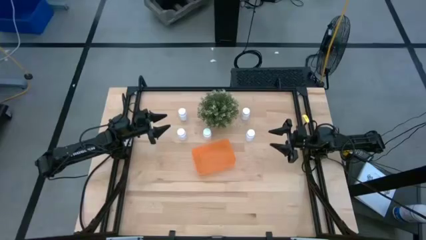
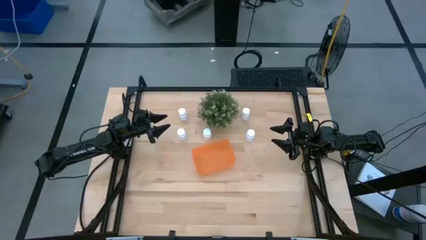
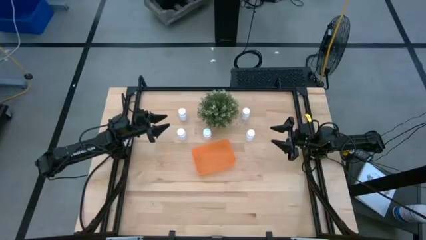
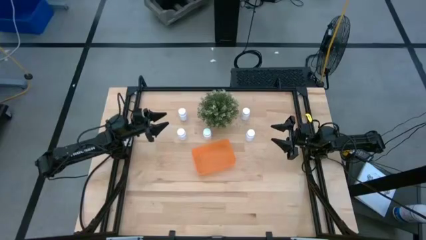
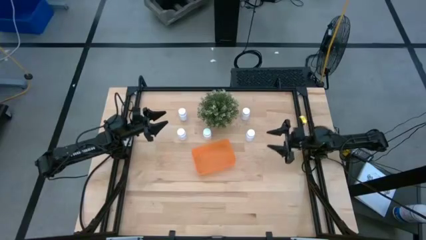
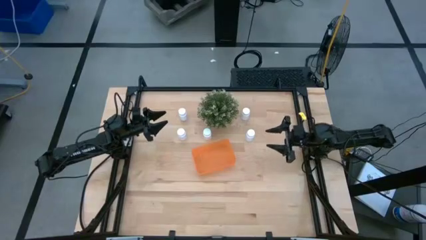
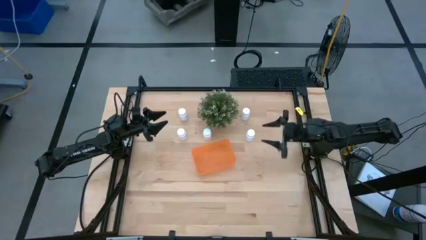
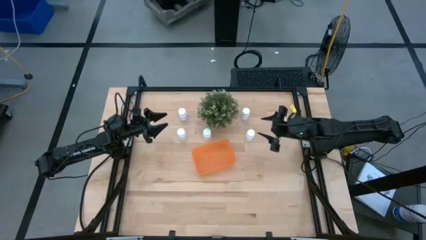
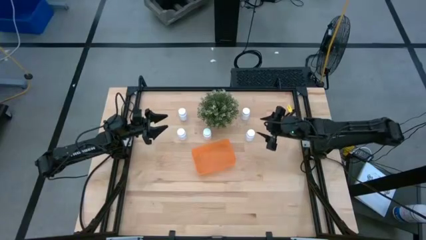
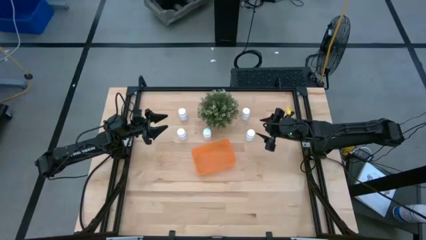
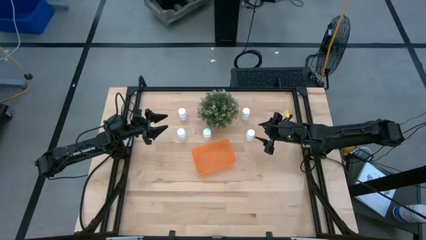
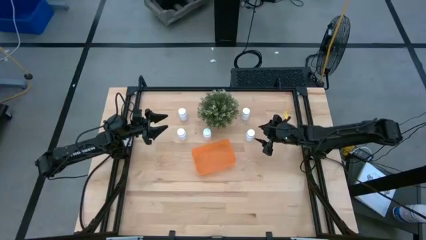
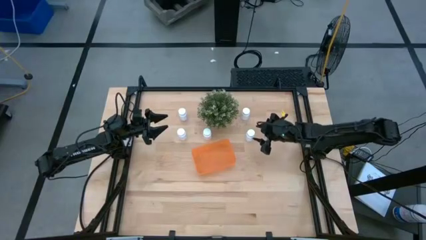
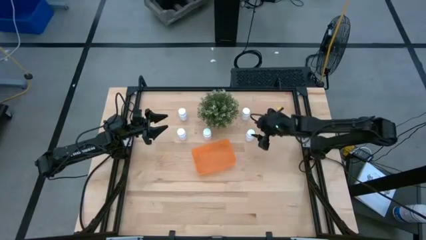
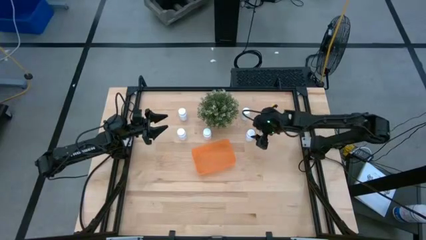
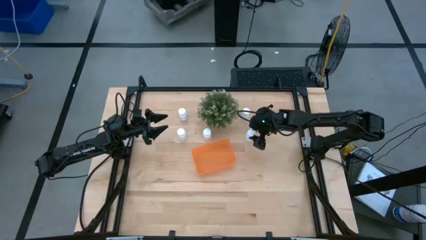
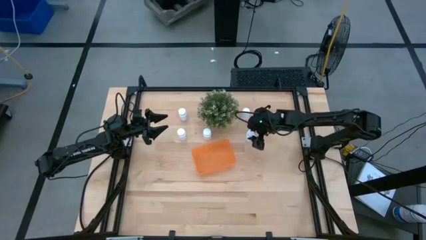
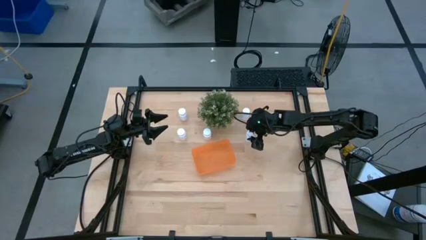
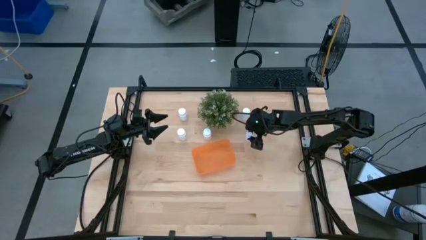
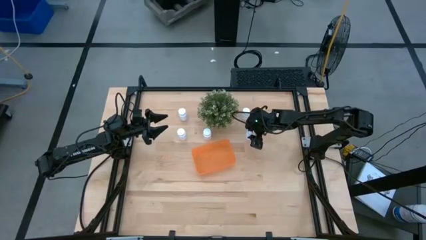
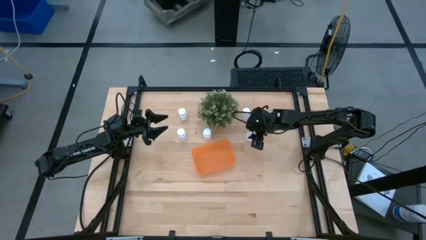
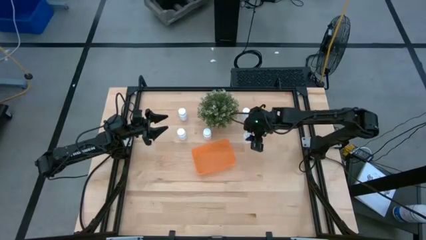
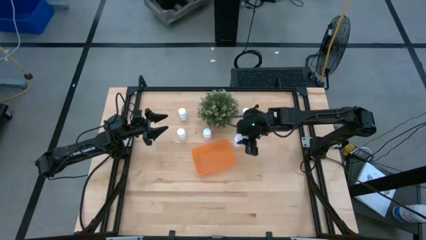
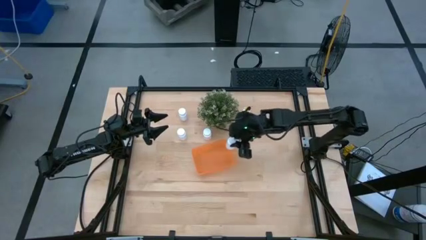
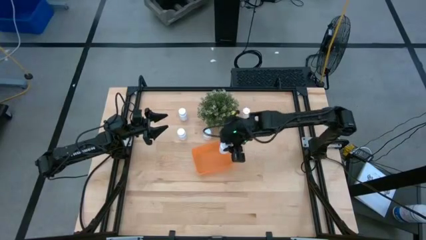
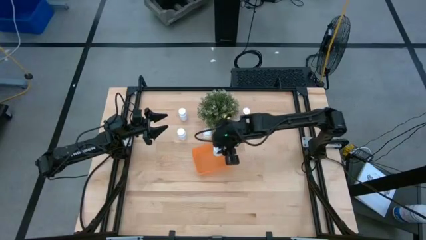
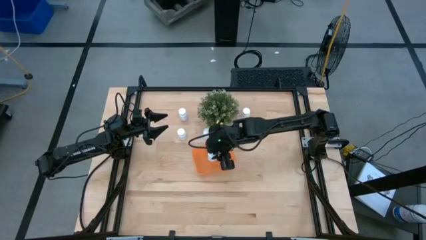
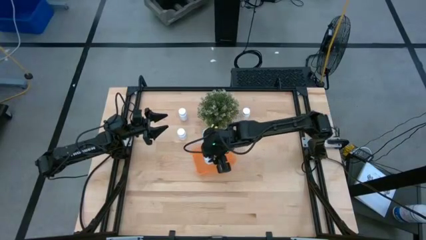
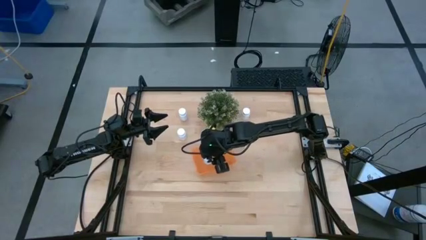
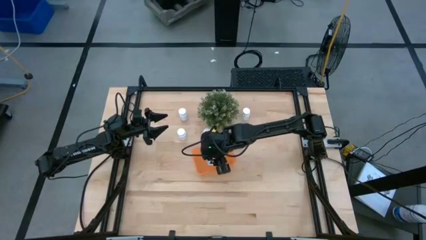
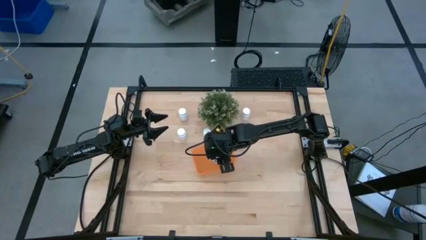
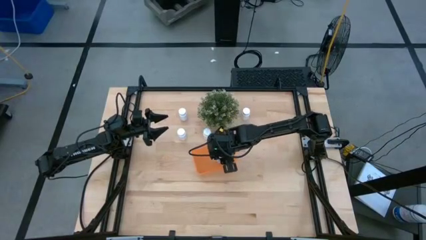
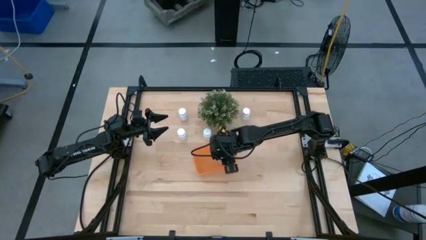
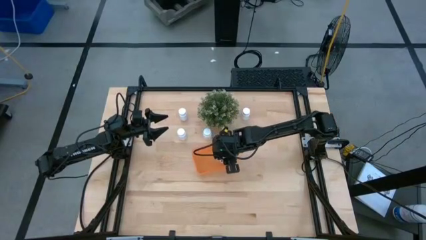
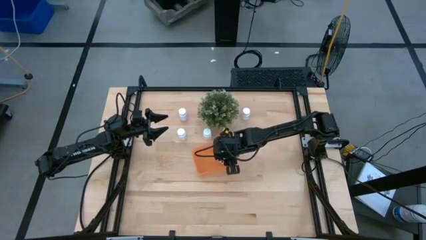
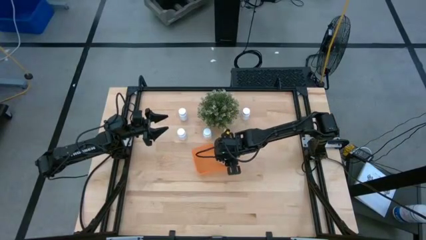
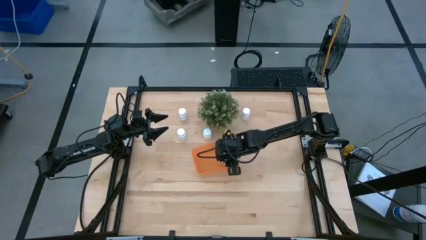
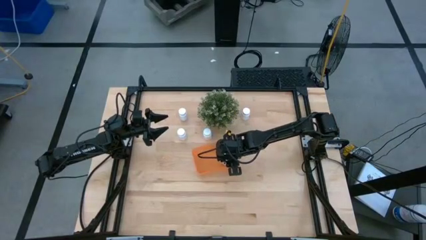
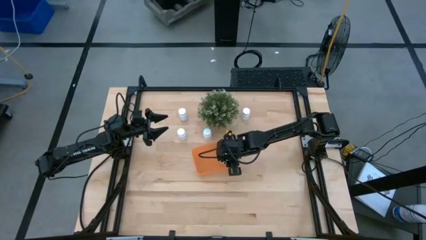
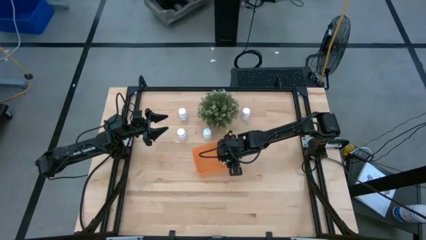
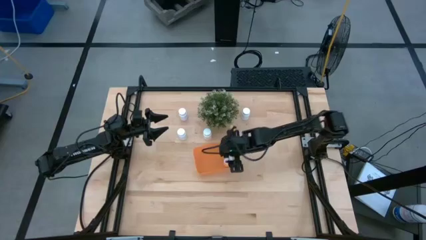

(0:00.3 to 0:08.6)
Task: Pick and place pill bottles into a basket
Put the white pill bottle into the orange bin

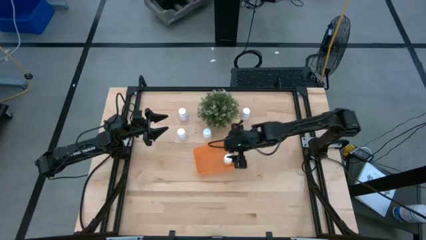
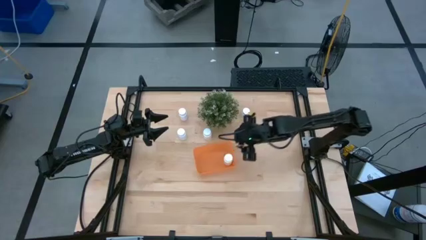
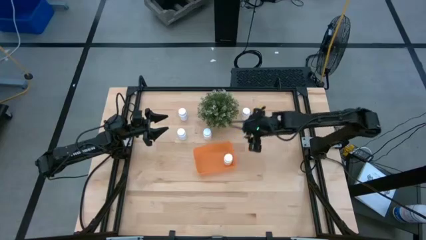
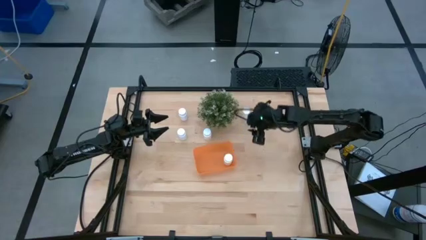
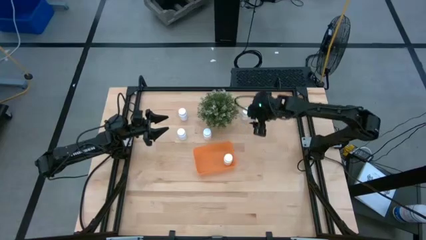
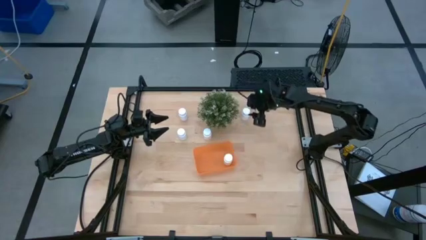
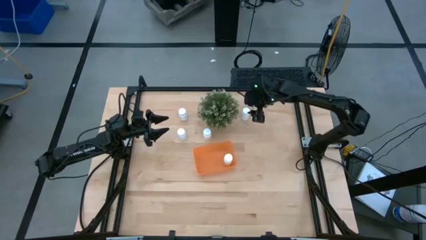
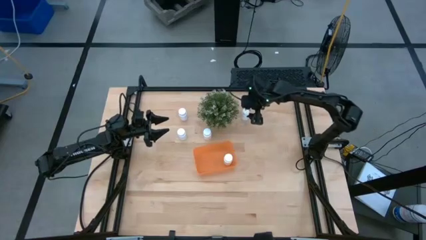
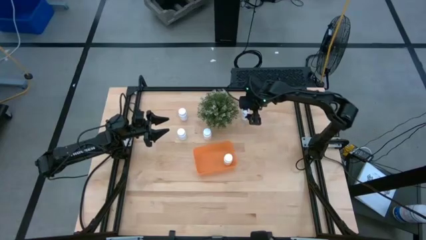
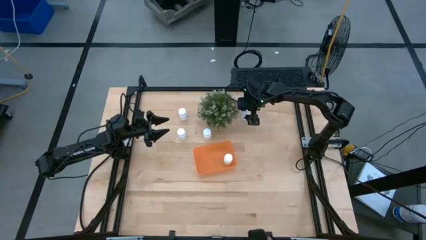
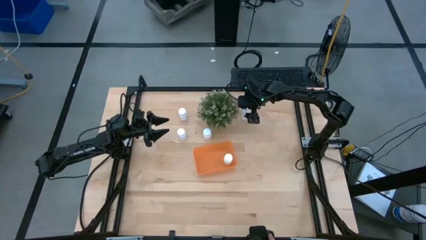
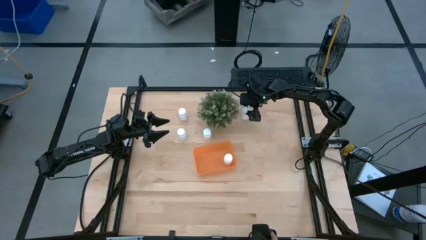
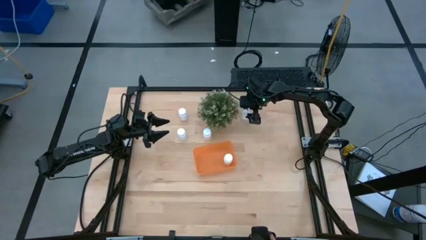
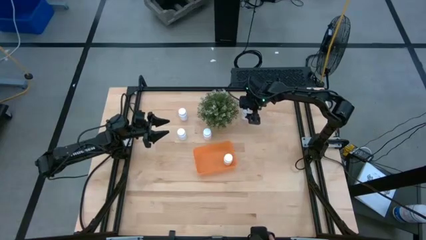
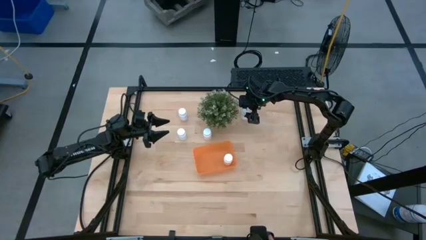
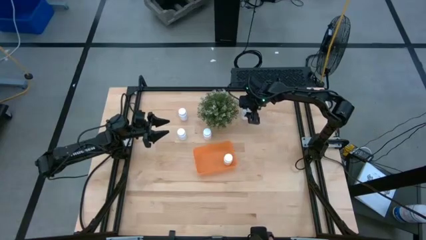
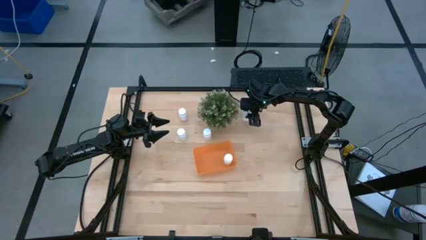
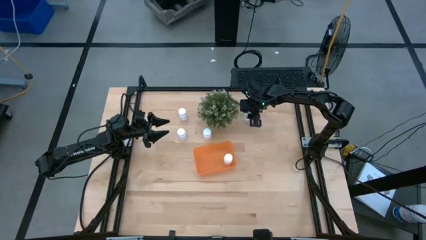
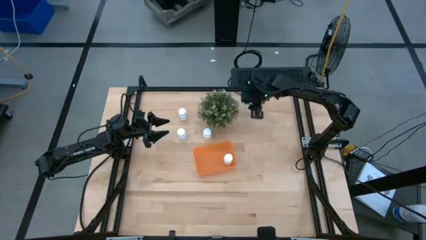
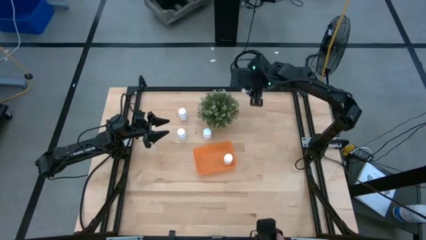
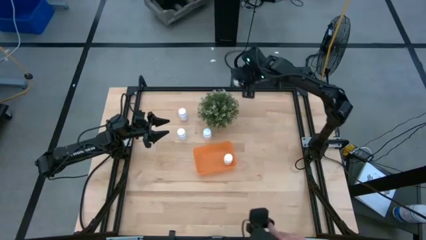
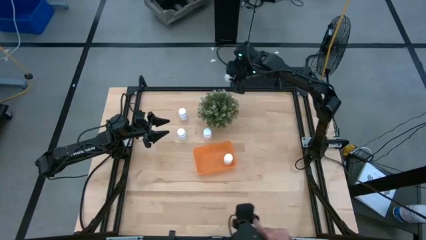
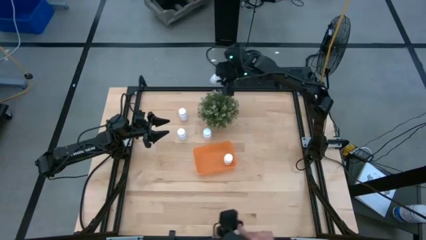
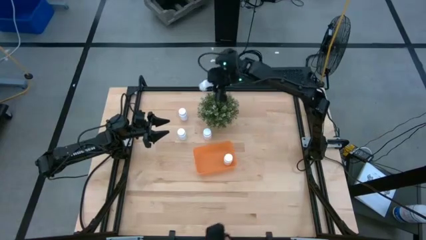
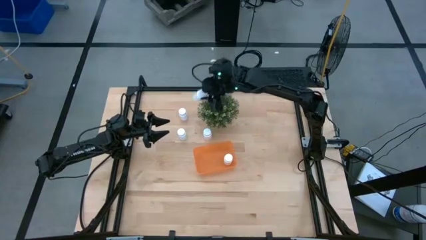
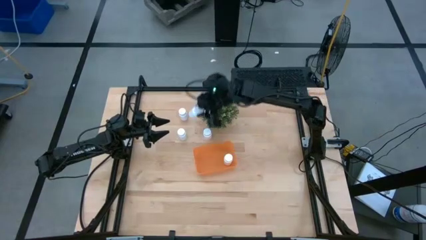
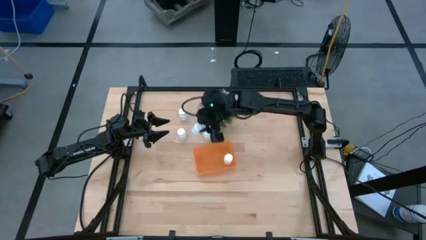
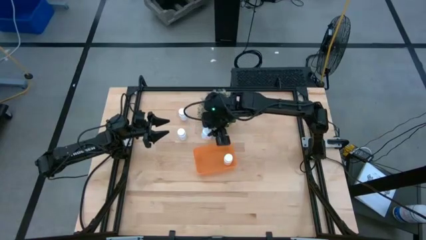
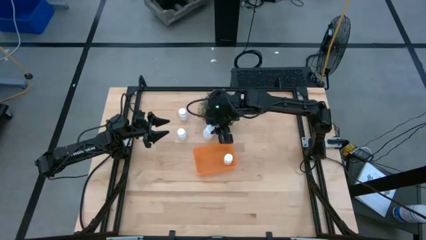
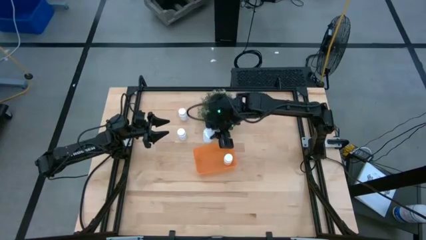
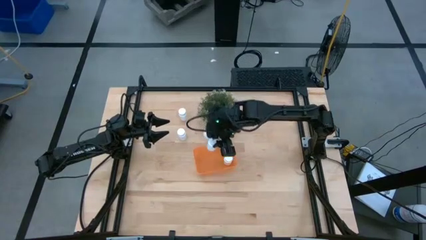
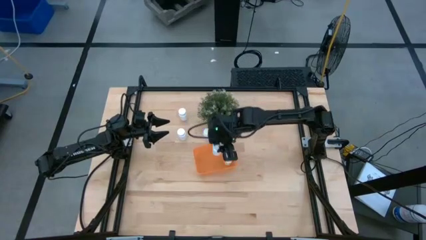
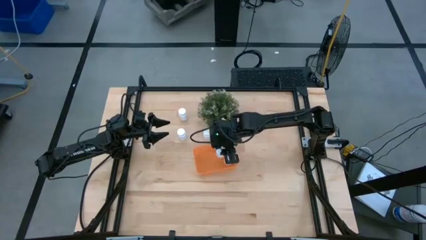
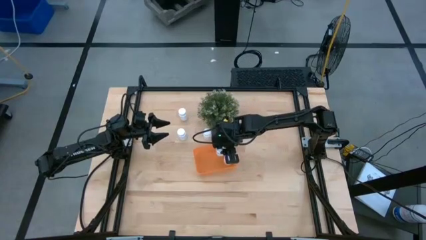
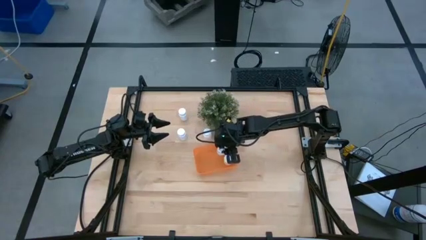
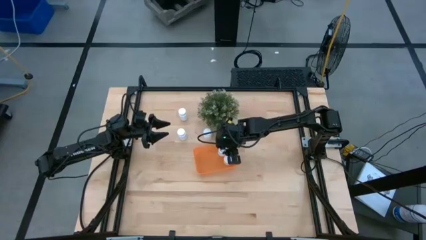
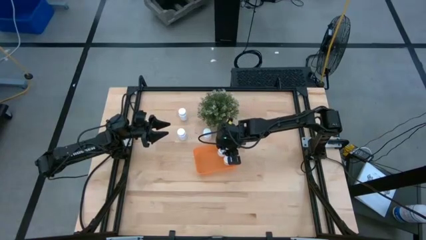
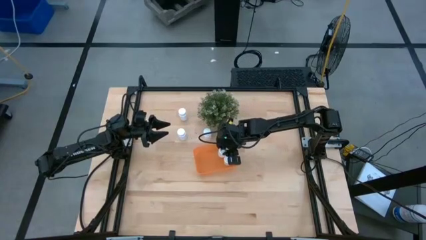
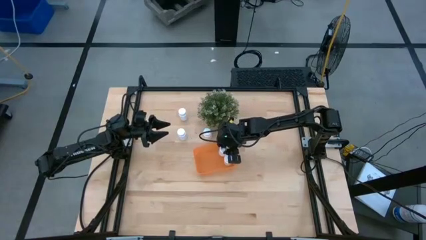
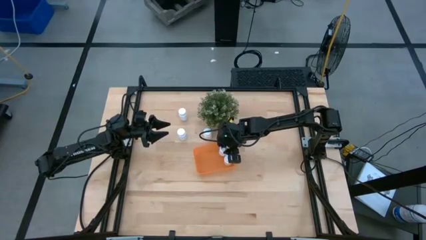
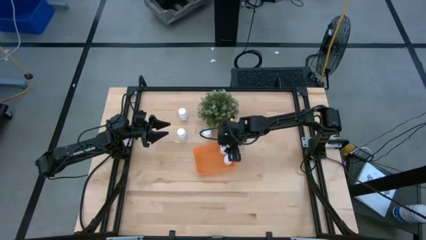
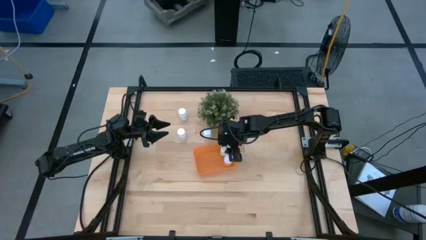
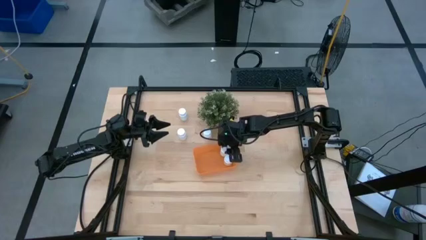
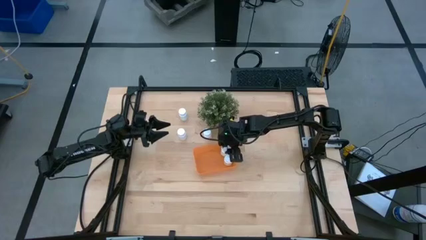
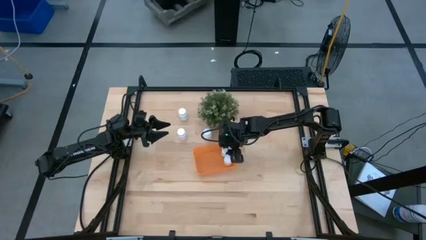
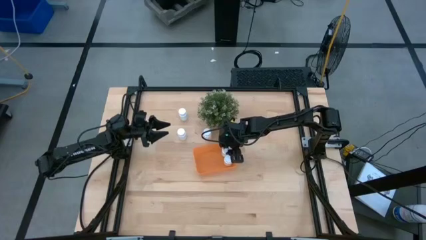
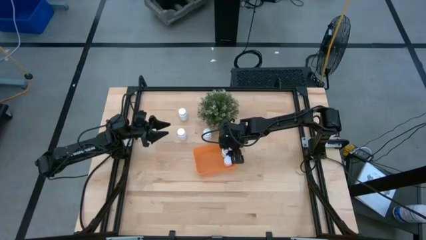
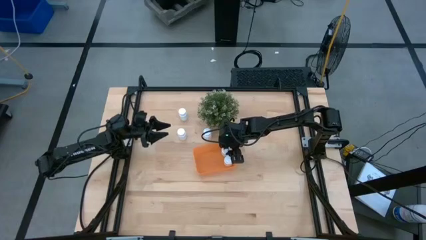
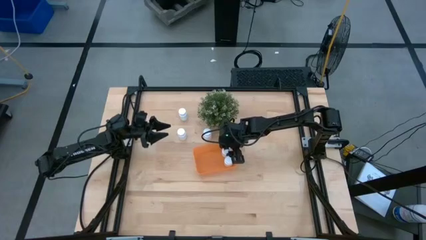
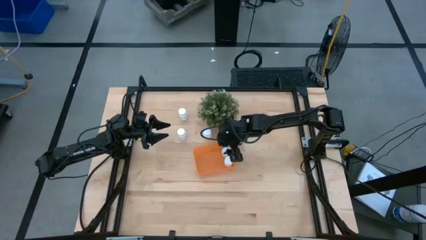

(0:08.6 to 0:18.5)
Put the white pill bottle into the orange bin
